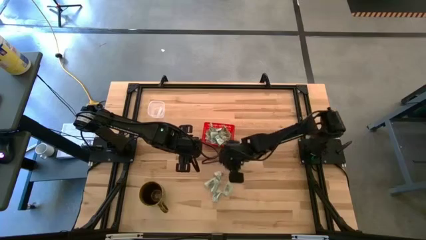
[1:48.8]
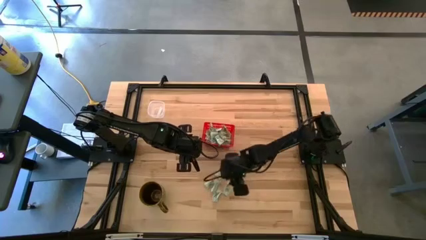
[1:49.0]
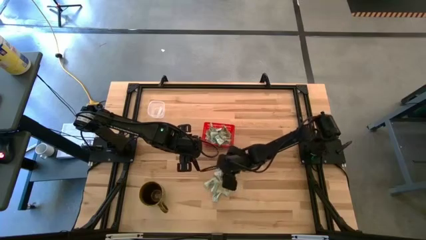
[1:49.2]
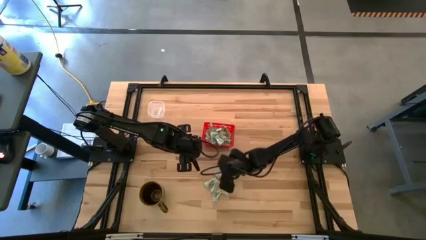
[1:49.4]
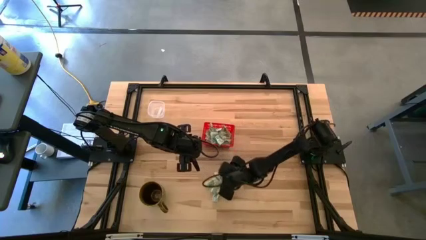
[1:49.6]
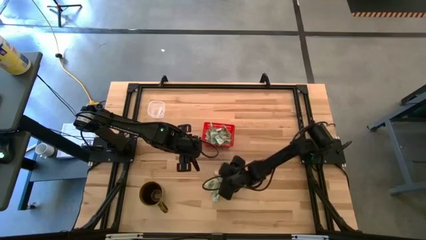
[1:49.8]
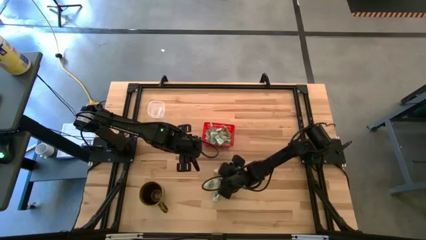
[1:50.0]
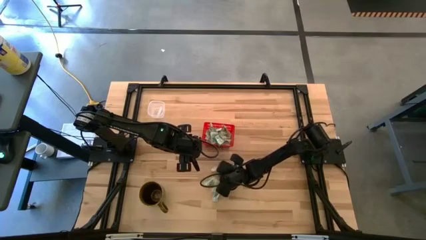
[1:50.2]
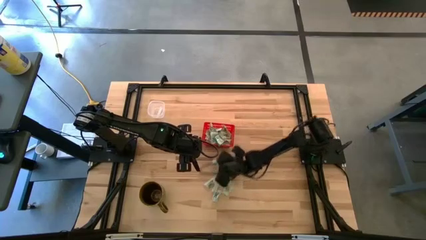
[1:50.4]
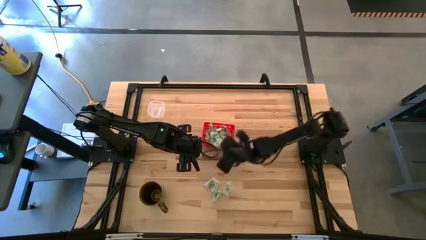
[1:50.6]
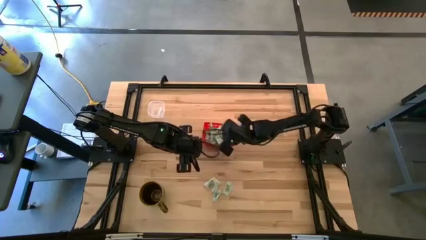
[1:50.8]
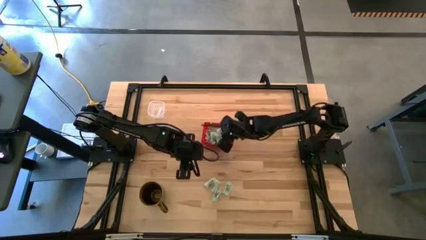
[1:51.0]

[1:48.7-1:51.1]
Task: Pick and place items into bin
Put the green stevia packet into the red bin

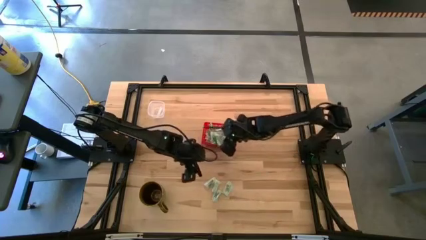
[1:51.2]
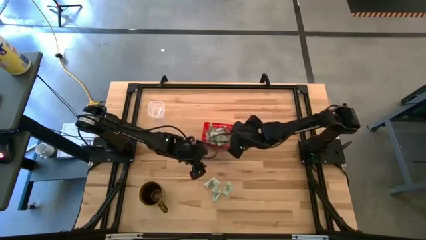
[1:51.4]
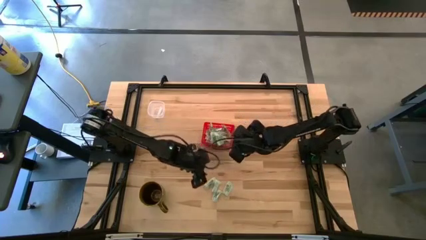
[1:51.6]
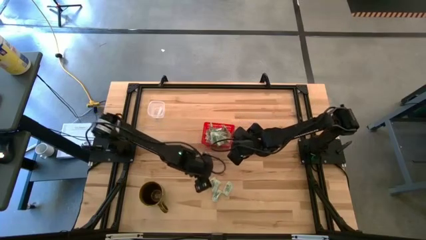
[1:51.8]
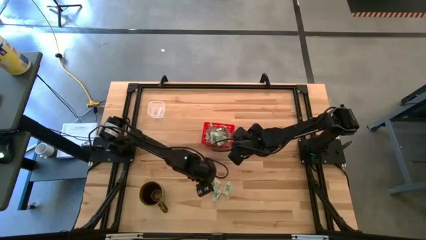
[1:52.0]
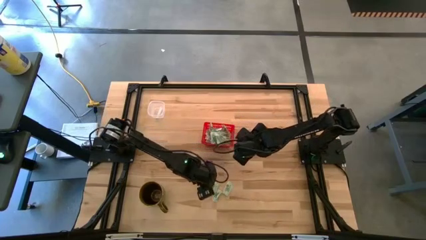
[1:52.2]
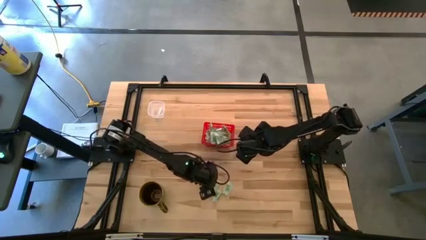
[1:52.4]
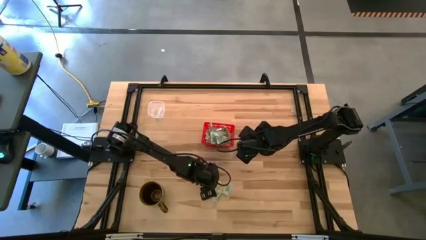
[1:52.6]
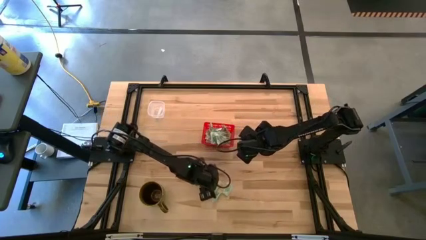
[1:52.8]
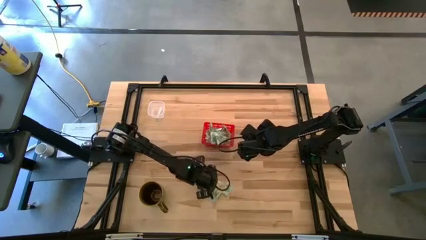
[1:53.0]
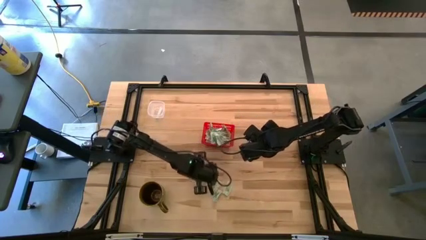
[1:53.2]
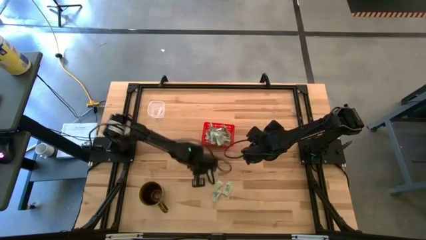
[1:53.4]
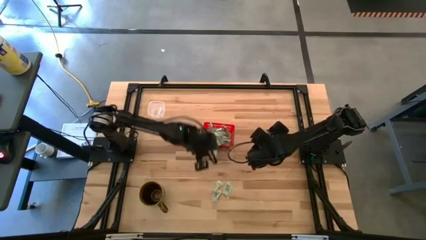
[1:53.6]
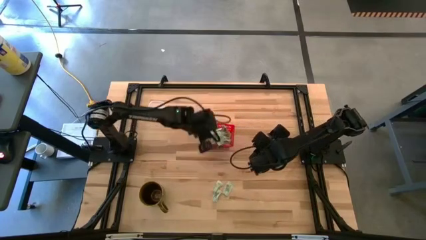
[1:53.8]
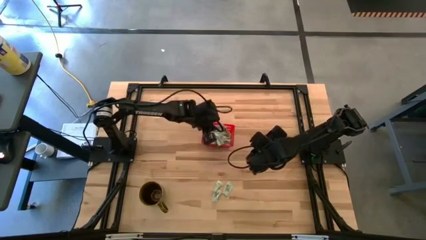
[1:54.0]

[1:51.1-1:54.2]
Put the green stevia packet into the red bin

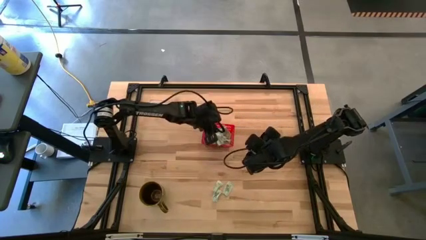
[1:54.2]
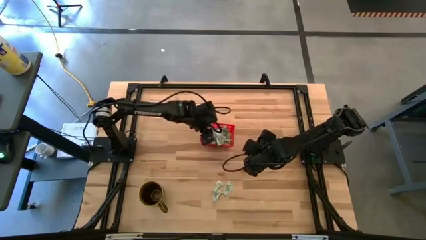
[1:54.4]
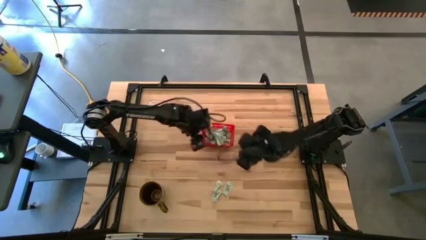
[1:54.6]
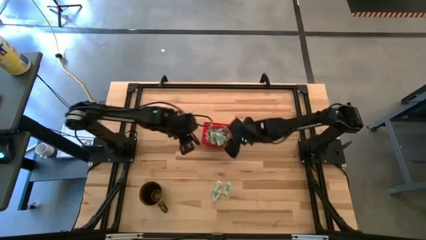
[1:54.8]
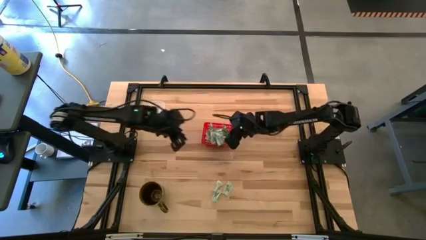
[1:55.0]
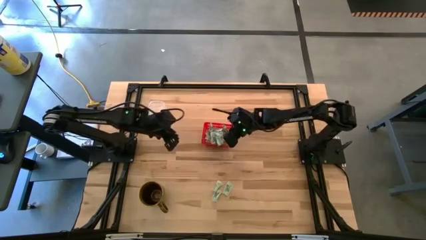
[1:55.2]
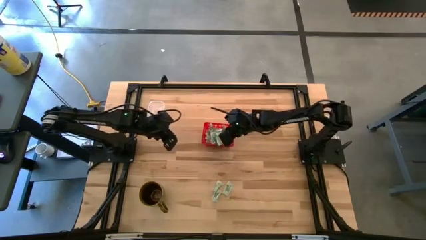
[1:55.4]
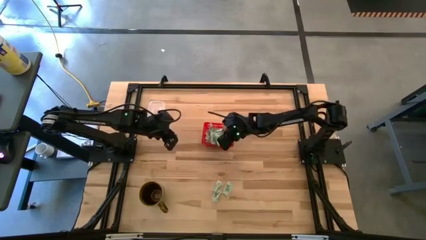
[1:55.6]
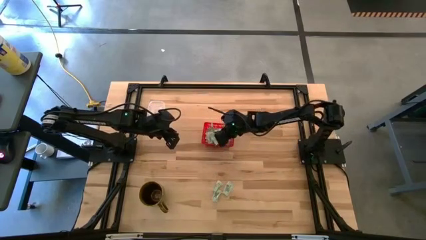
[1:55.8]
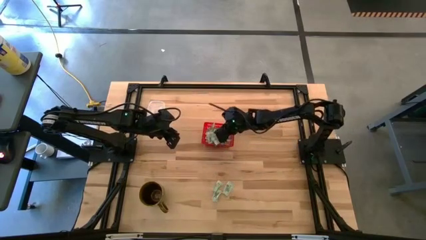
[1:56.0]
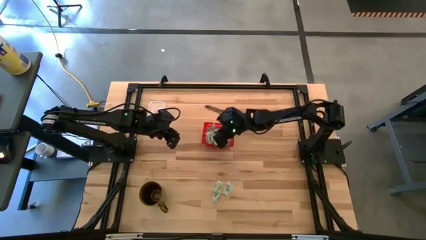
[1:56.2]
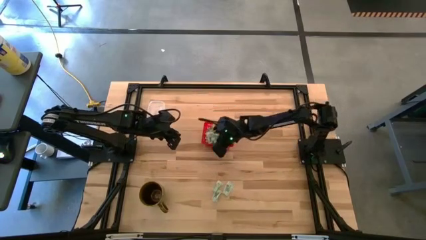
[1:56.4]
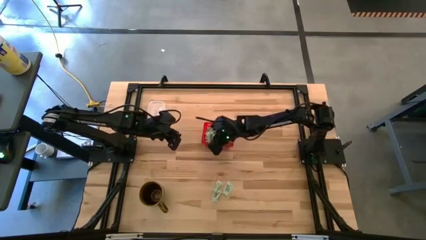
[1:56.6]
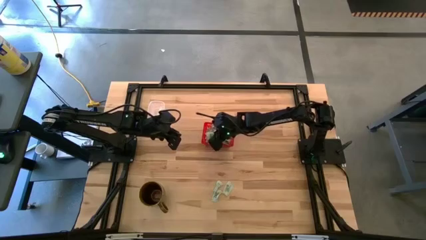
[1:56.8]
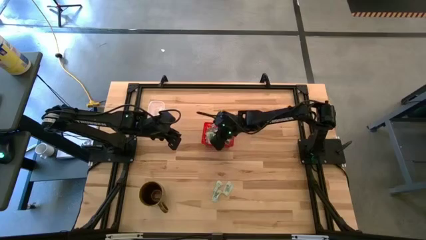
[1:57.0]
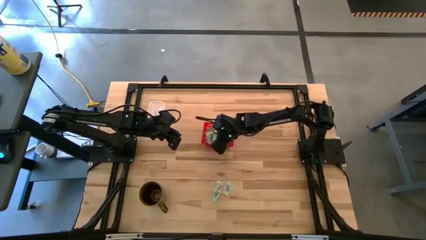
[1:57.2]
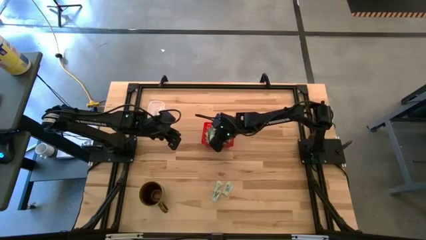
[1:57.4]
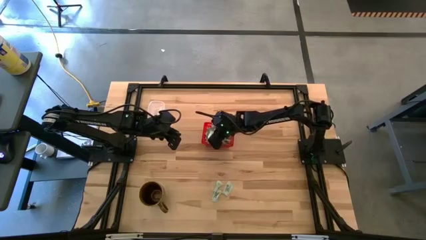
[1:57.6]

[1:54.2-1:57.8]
Adjust the green stevia and white truvia packets in the red bin

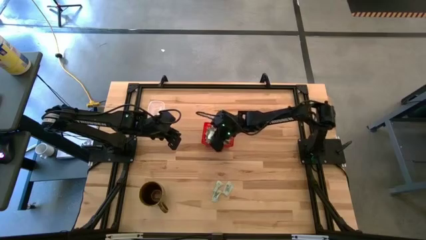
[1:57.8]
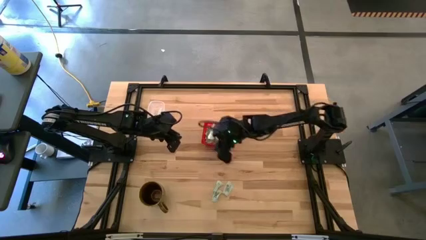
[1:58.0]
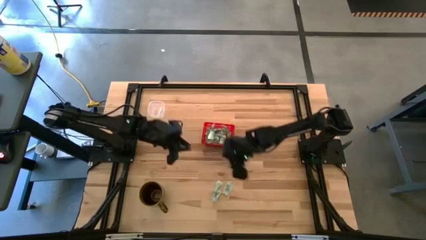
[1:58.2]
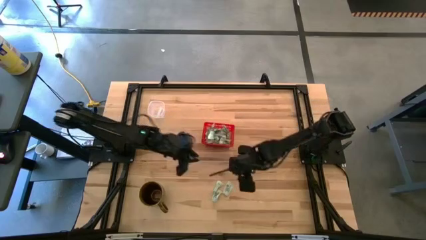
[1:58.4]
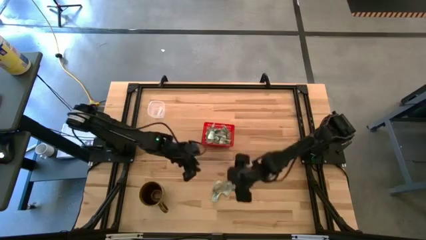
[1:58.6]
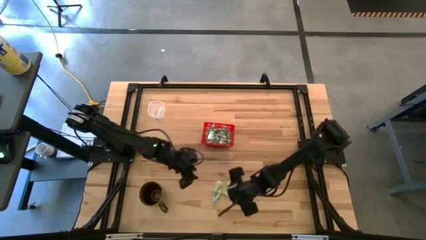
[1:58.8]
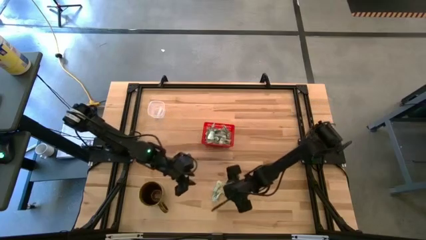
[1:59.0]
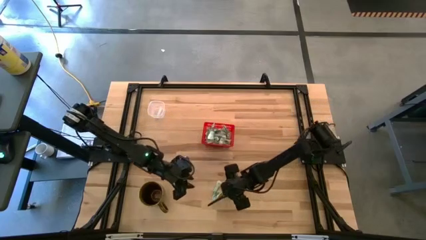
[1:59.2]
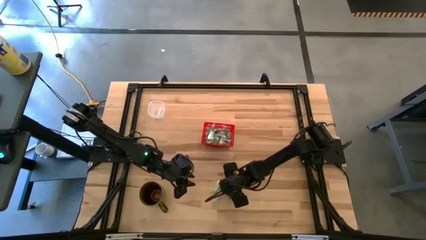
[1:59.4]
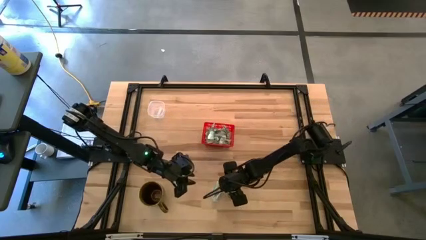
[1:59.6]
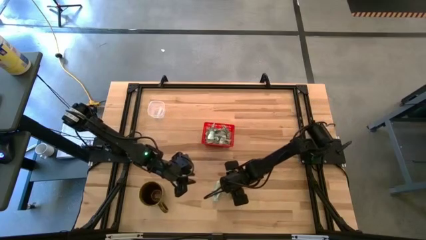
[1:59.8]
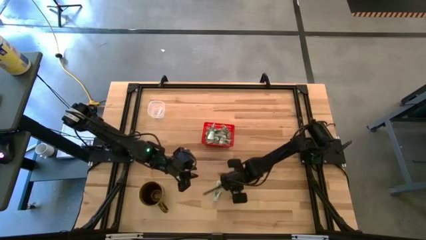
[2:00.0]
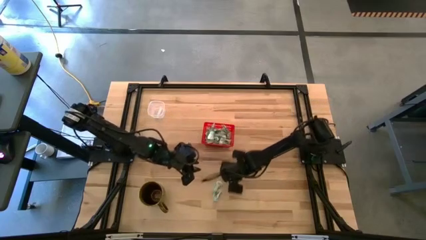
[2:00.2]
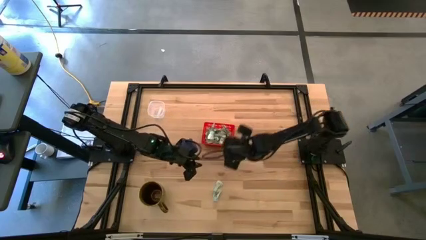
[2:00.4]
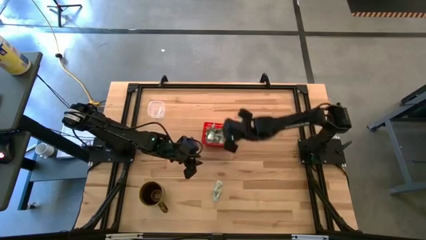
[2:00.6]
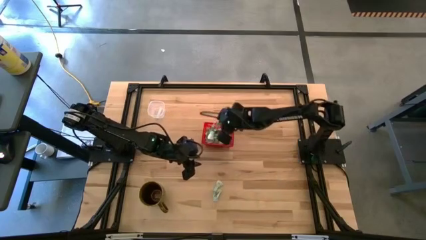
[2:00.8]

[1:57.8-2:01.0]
Put the green stevia packet into the red bin

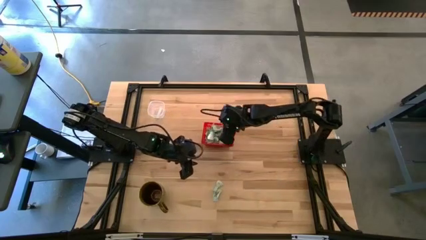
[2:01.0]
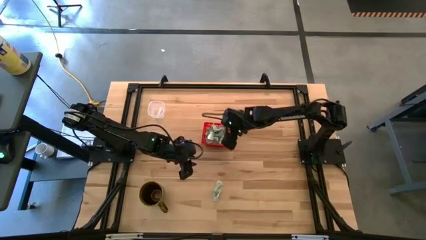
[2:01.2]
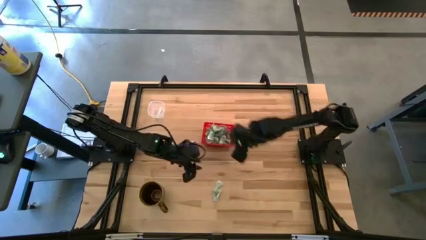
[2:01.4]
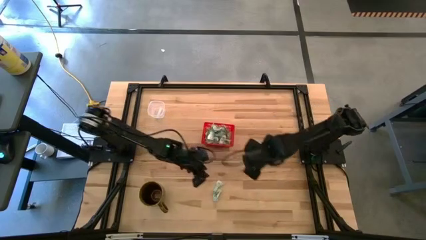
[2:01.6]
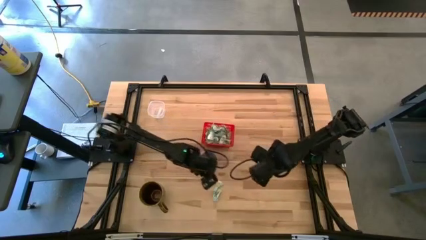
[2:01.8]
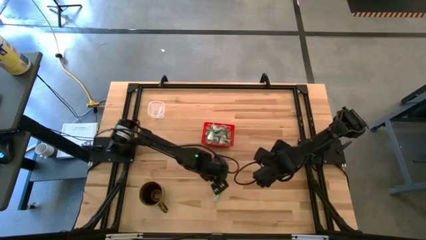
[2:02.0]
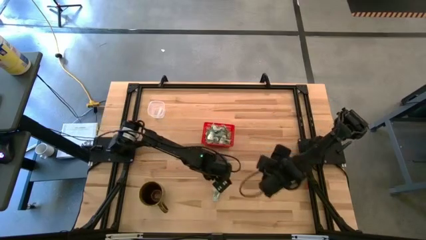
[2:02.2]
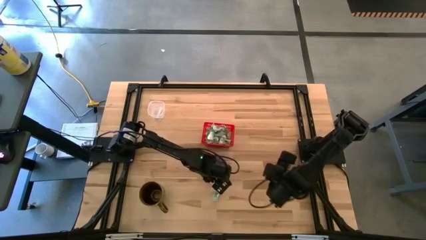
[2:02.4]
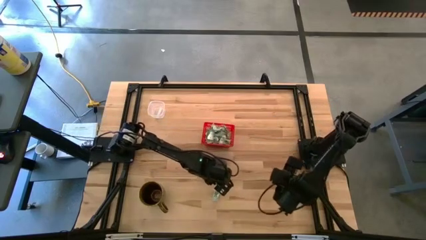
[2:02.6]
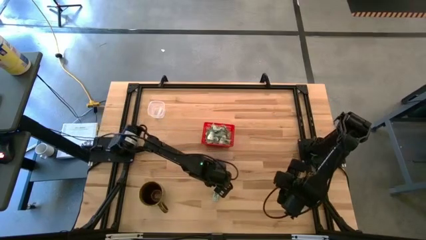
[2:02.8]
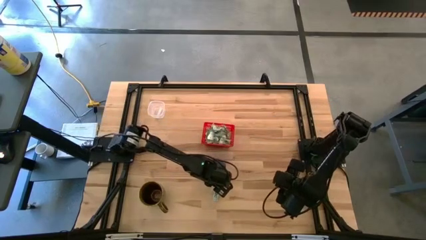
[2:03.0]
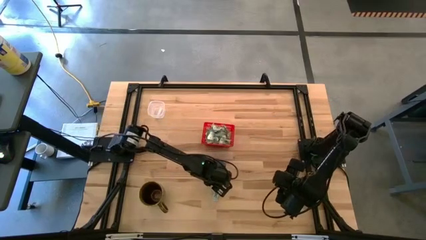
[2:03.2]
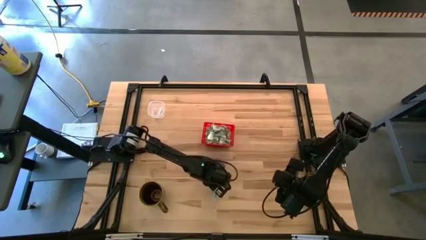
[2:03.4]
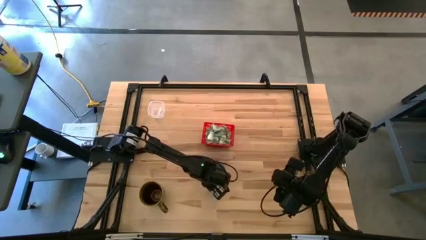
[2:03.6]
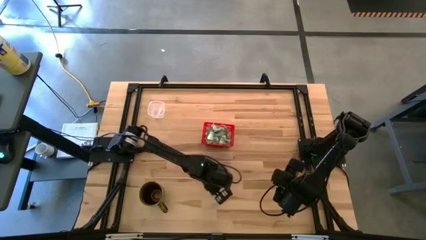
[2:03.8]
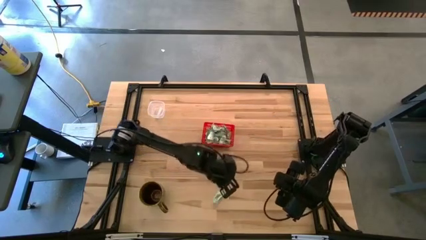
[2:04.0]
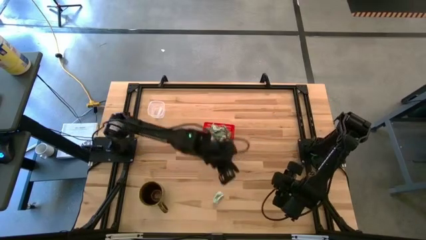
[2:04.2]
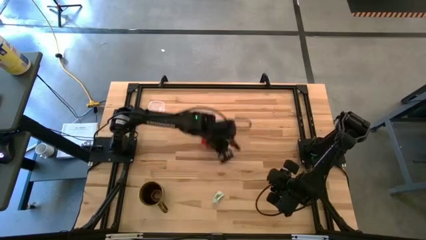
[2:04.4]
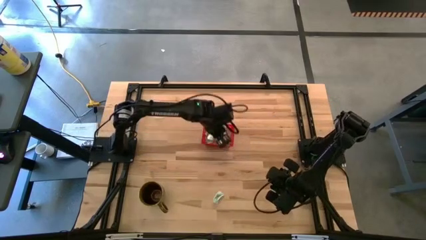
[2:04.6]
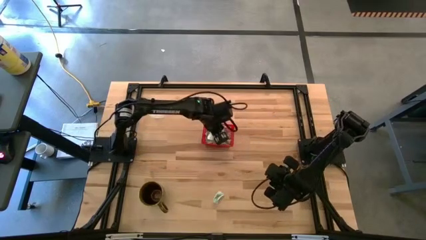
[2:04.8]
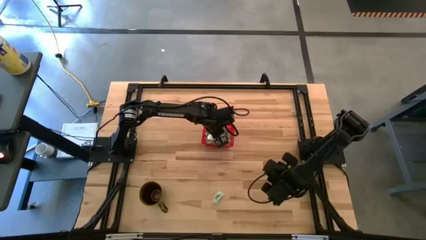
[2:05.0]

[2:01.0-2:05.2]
Put the green stevia packet into the red bin
